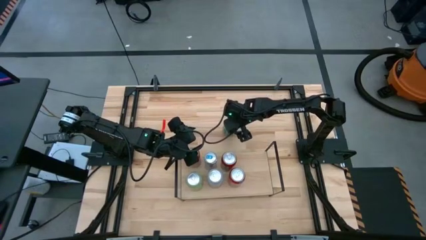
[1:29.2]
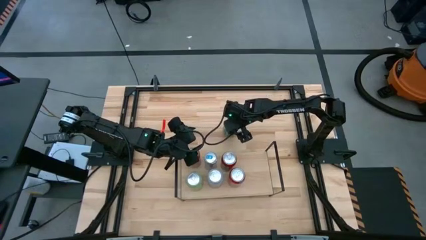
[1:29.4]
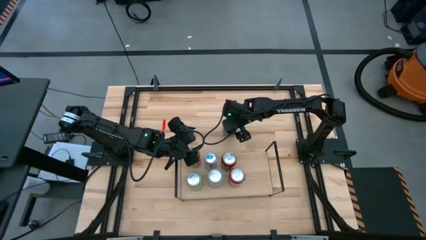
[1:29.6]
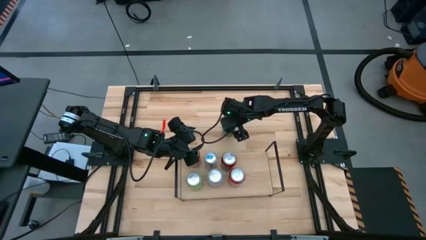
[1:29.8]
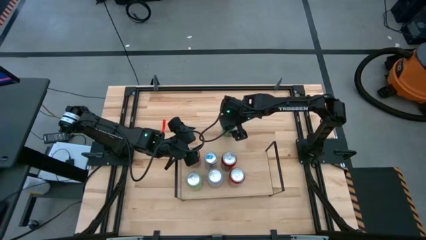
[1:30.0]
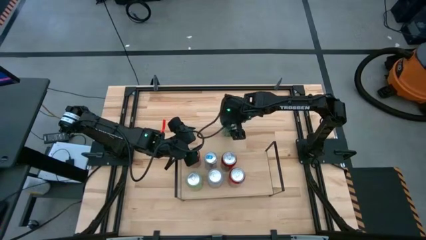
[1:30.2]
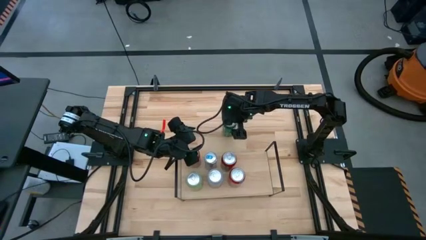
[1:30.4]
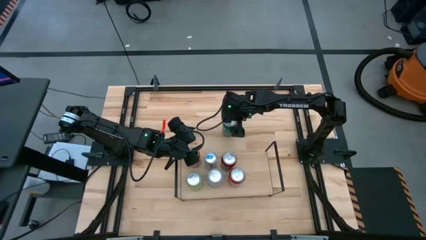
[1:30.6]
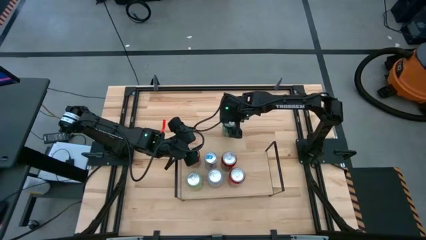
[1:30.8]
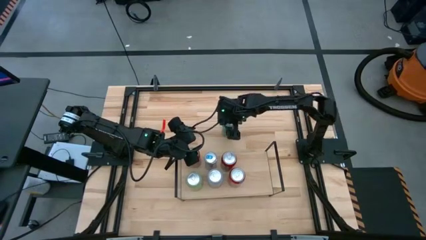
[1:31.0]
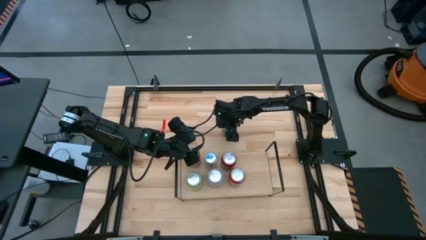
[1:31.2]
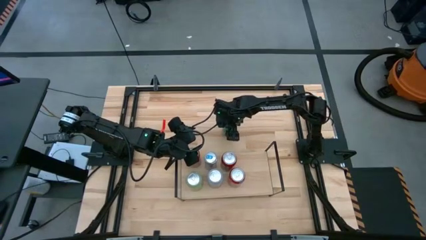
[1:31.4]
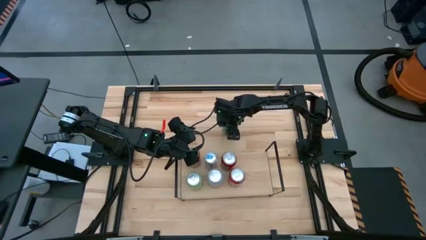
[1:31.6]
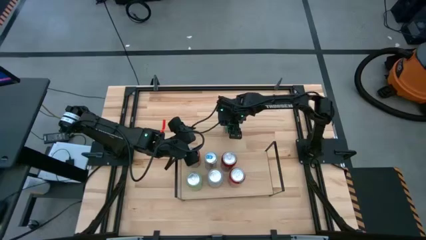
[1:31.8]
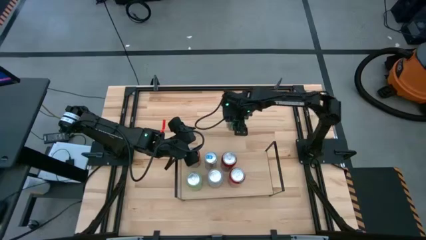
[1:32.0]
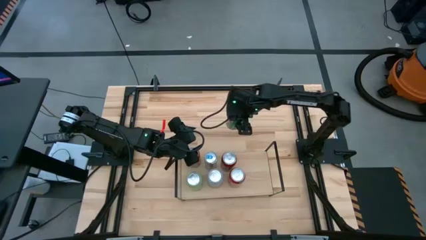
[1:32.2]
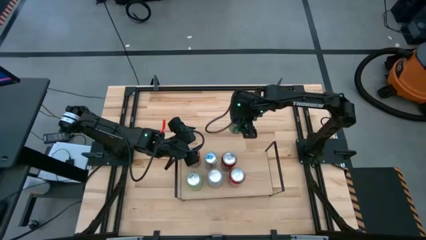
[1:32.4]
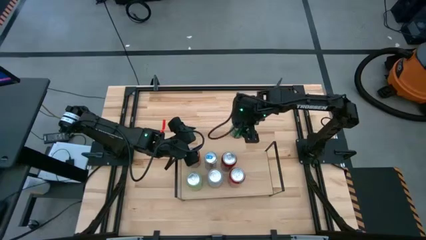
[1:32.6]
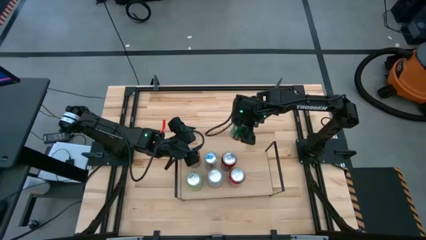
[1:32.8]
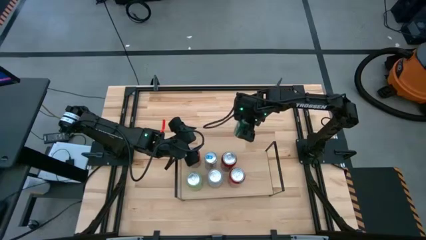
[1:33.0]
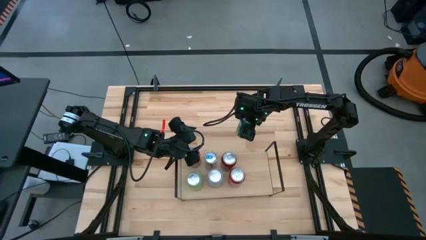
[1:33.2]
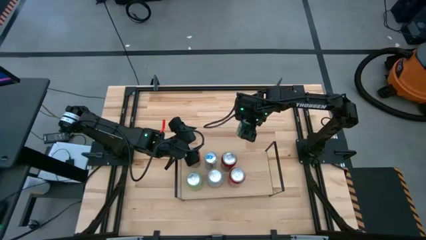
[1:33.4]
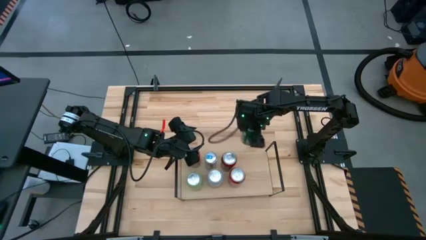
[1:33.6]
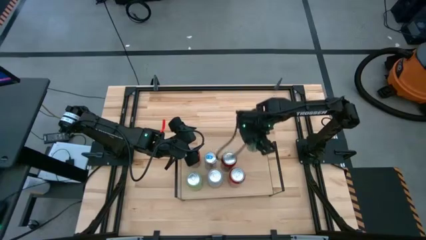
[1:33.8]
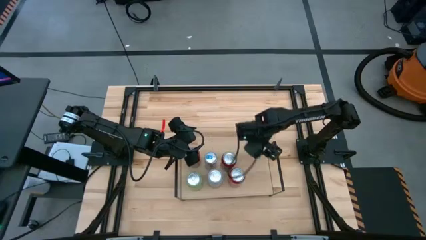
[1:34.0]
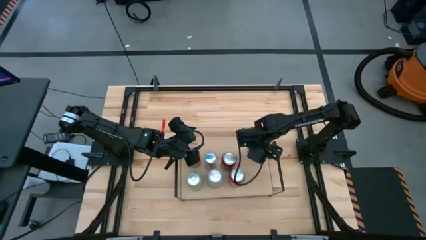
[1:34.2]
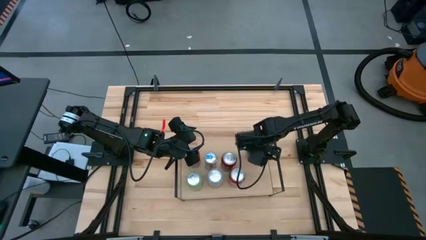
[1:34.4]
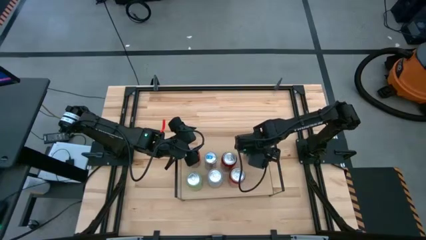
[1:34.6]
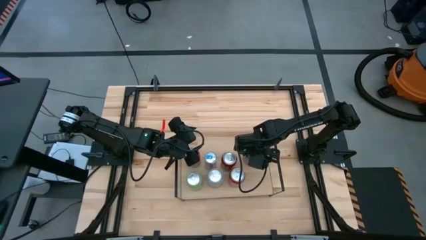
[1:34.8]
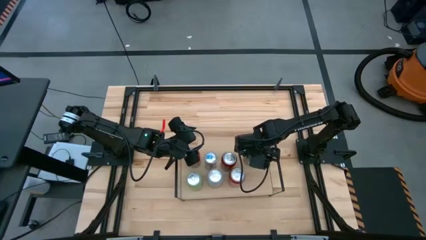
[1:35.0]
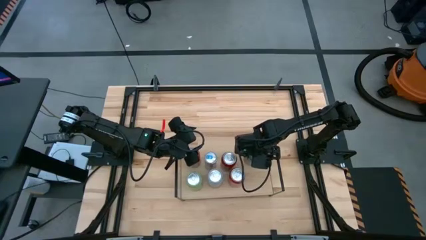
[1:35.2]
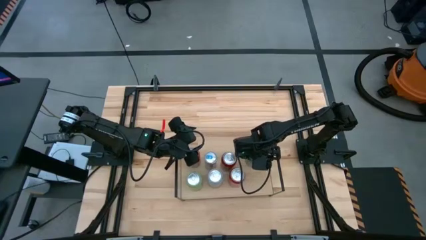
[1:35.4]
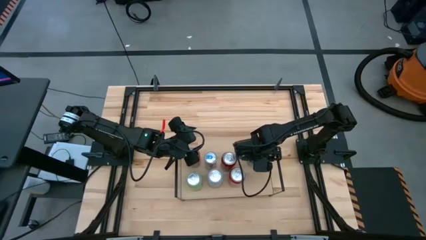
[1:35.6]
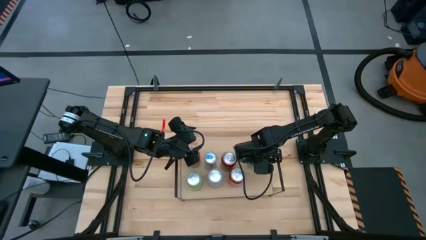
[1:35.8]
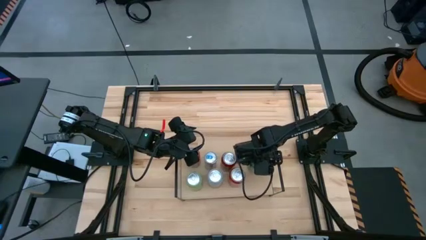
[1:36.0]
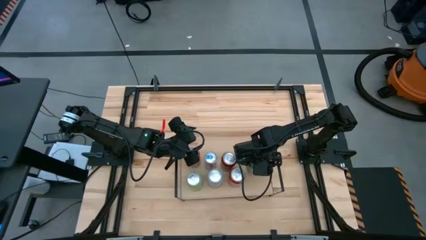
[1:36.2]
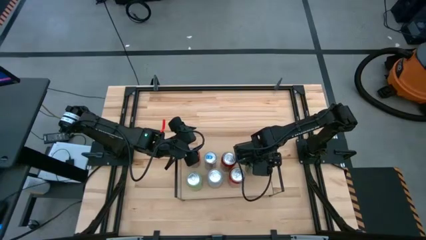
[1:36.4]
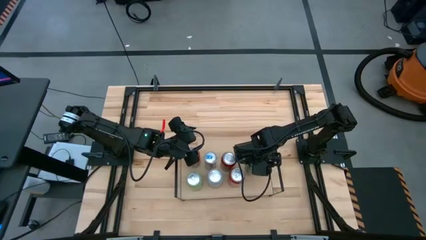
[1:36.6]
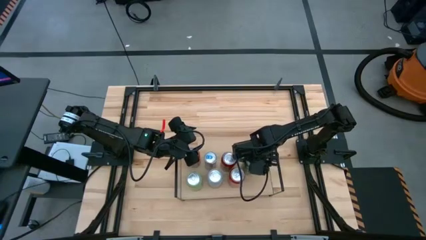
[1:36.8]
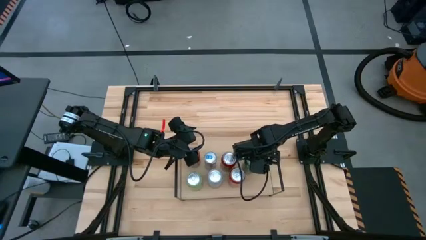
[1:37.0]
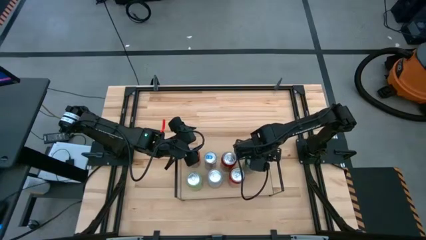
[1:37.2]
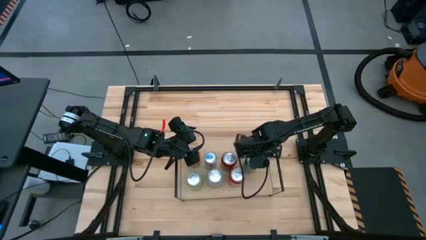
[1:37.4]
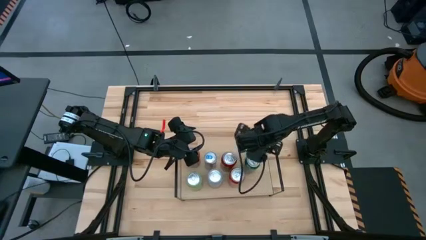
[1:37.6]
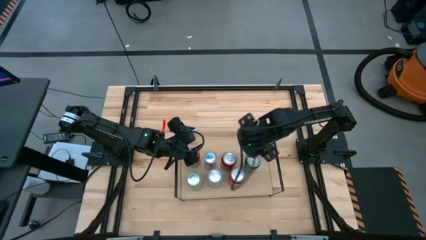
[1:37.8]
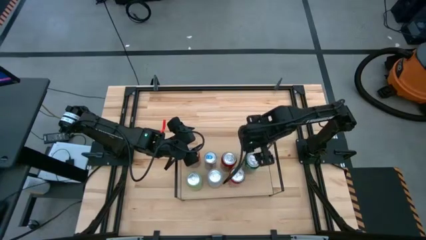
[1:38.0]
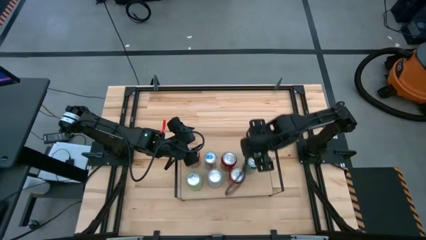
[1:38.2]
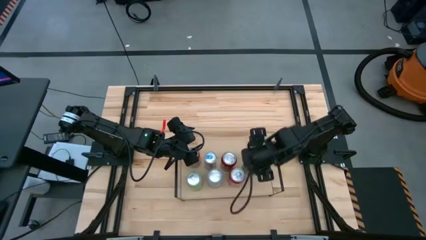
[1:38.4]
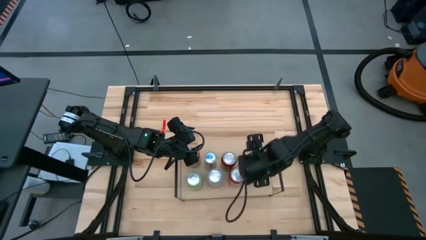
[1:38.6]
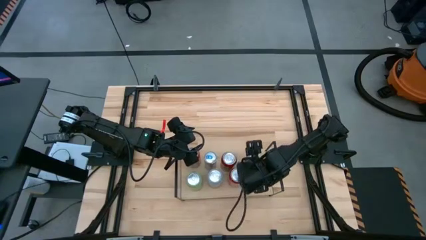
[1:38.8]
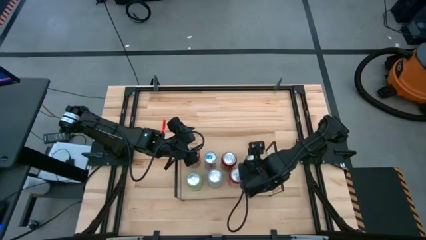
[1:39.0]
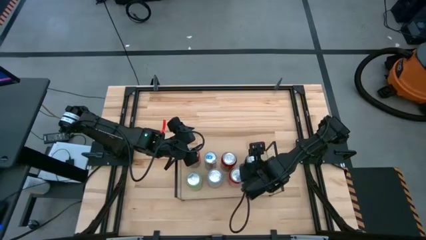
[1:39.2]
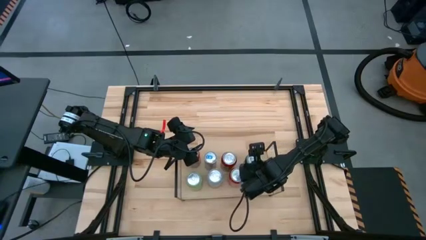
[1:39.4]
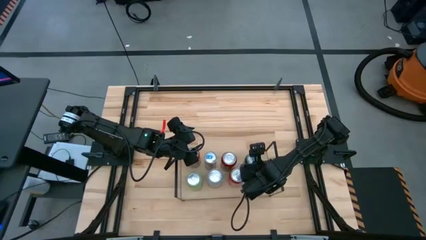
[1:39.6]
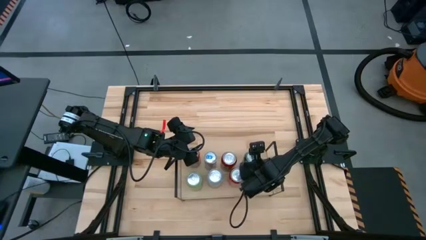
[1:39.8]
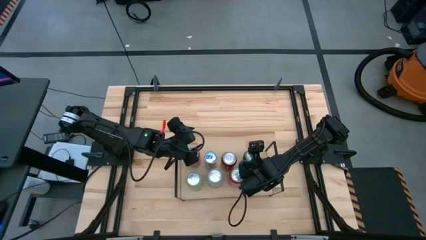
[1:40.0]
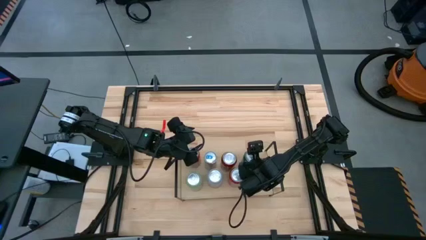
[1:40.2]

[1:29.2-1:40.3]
Task: Place canned beverage on shelf
Put the green soda can on the shelf

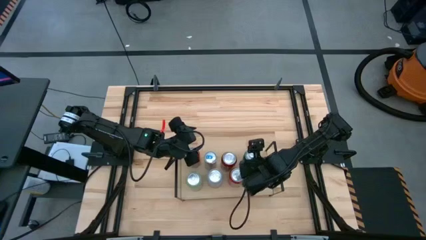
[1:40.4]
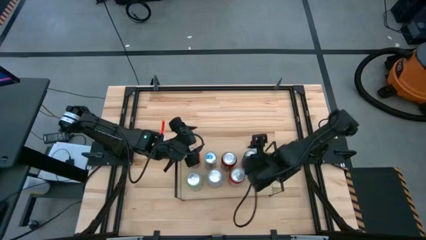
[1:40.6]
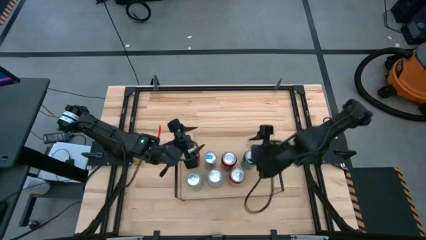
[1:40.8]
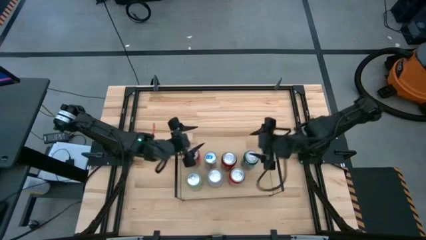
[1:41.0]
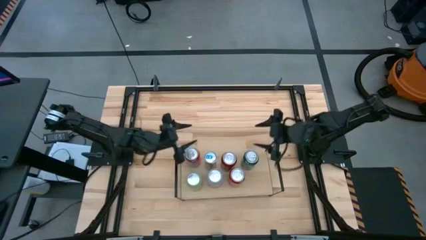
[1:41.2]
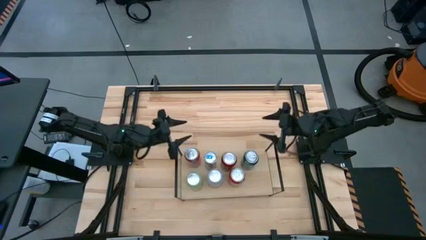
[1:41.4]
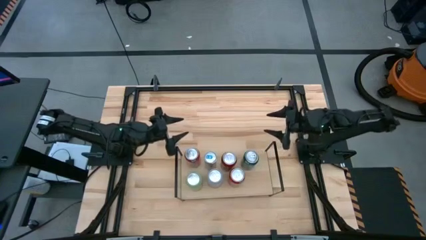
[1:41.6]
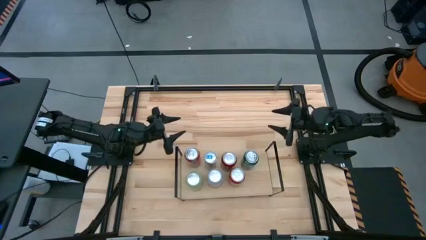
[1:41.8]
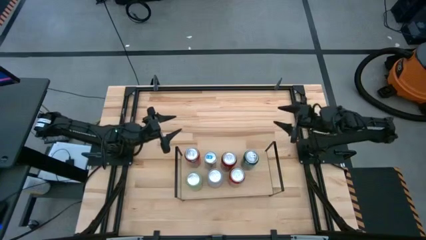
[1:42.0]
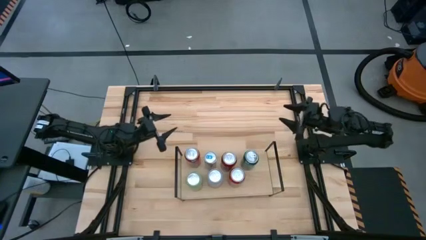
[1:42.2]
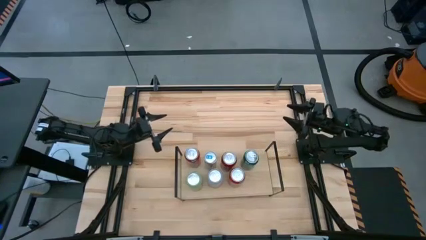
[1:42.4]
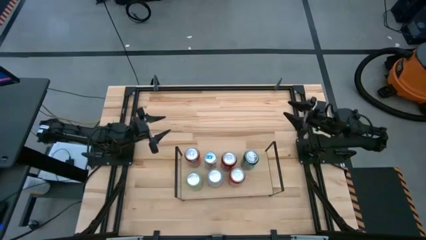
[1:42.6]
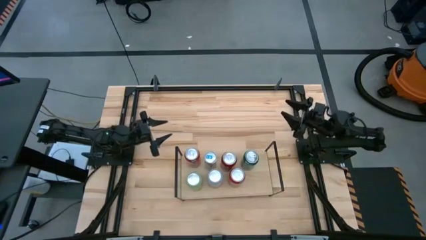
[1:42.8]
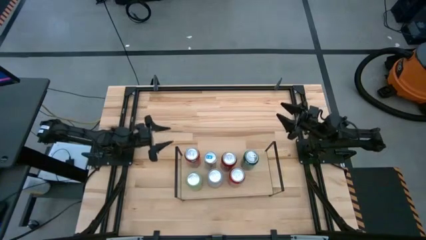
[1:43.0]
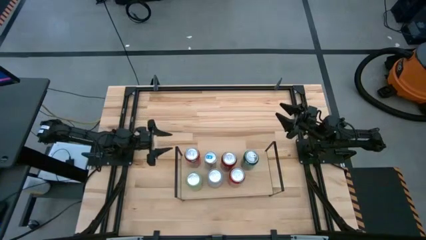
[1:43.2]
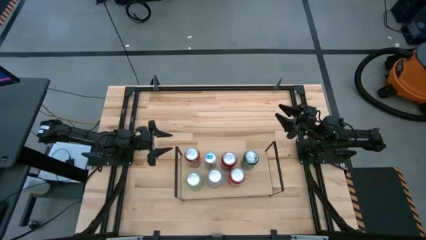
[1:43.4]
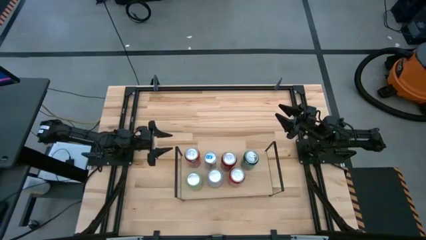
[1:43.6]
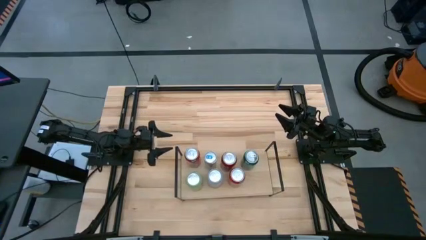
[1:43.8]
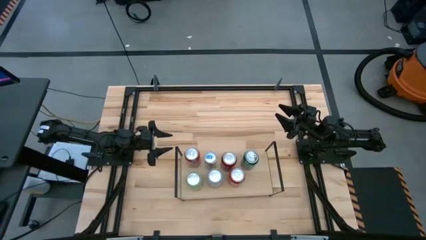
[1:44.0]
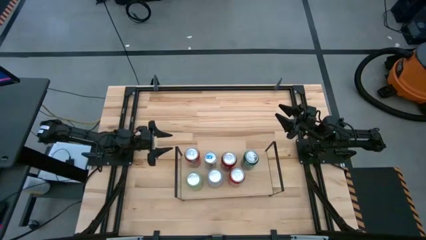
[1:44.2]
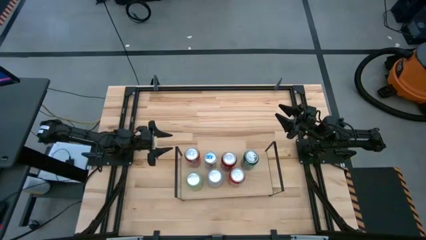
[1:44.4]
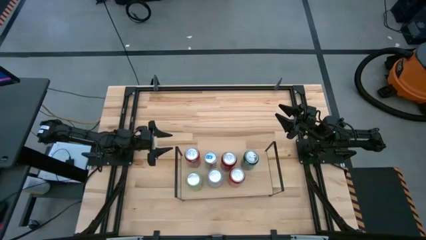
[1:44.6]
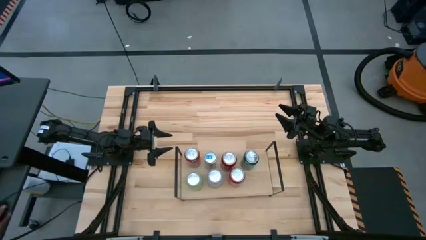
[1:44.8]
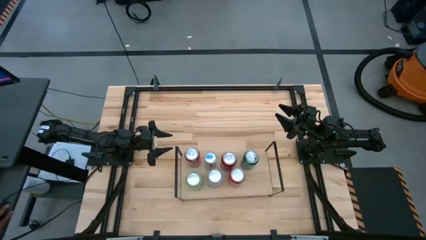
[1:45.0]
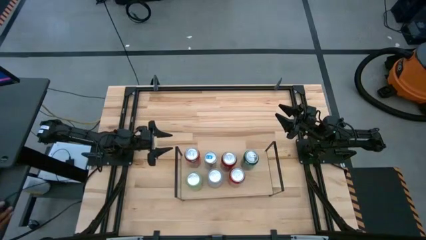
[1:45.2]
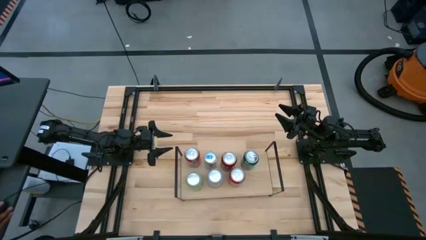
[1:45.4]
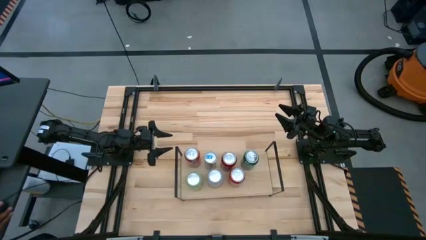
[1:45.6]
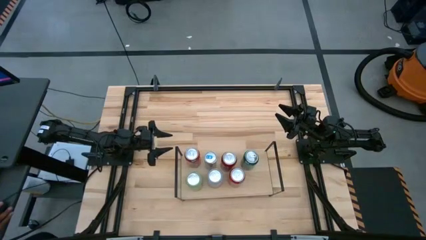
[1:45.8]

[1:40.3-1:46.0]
Return to Home Position
